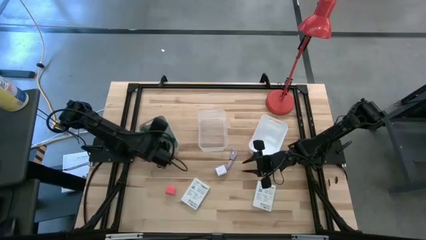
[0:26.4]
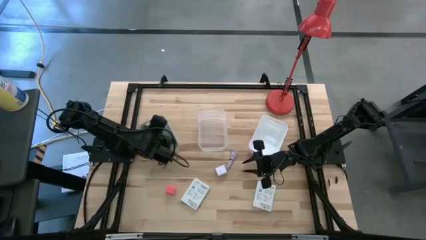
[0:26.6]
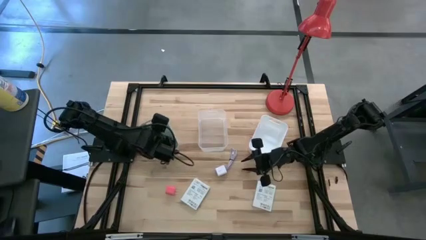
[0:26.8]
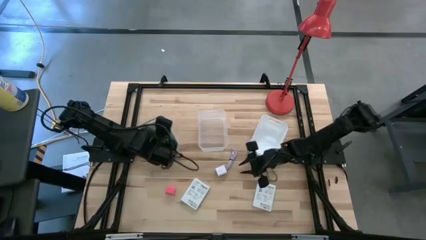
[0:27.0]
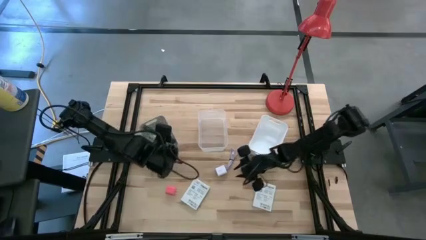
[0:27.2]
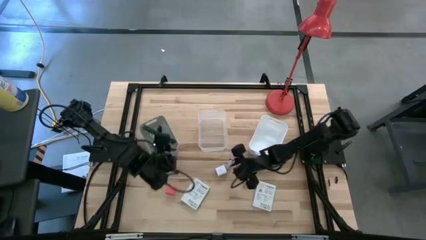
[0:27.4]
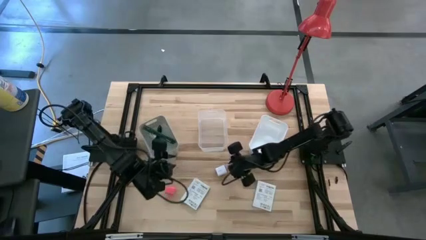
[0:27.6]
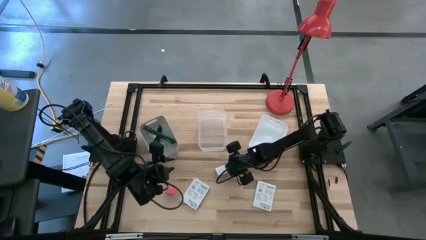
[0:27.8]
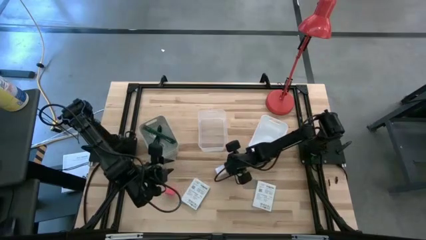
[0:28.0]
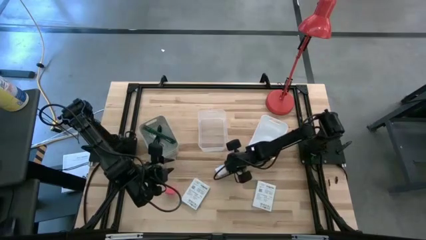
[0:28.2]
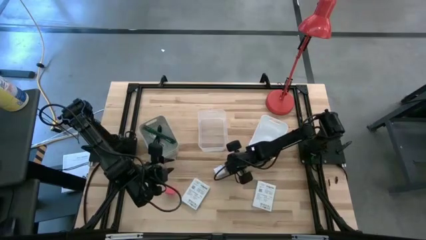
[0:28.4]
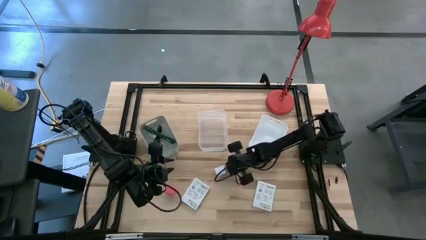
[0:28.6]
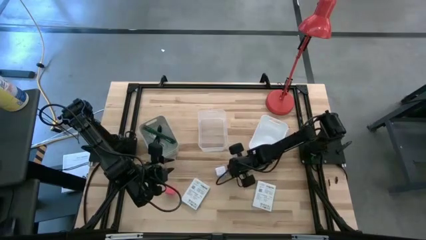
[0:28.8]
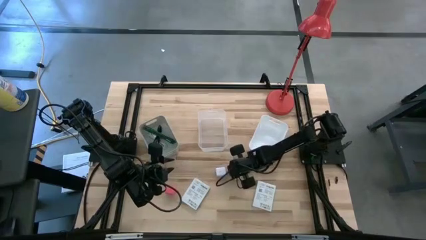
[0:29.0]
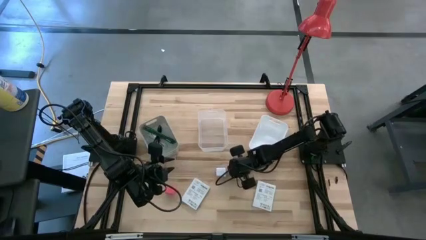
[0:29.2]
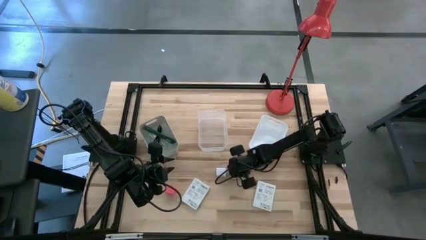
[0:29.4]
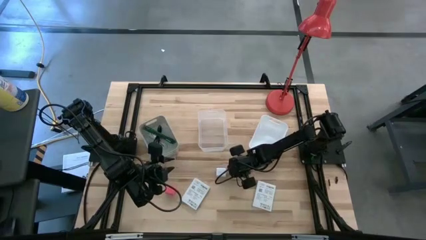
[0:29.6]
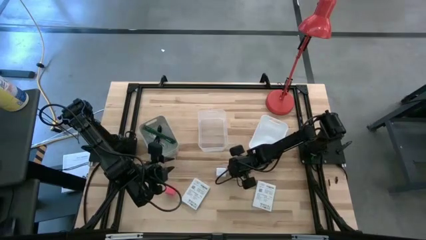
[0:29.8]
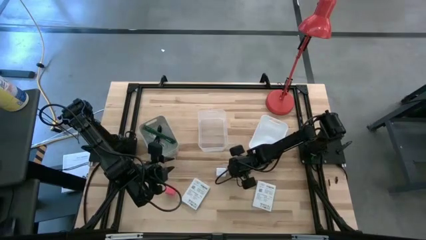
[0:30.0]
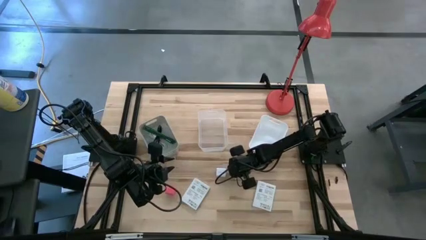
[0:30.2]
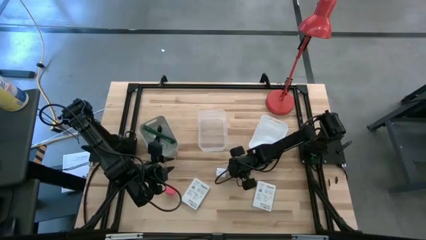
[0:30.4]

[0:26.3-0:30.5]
Task: Pick and place items into bin
Put the gray charger cable into the gray bin

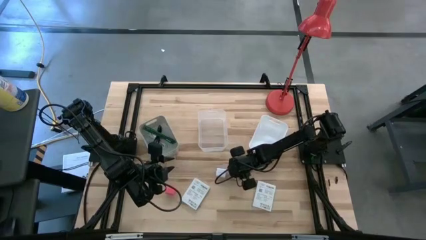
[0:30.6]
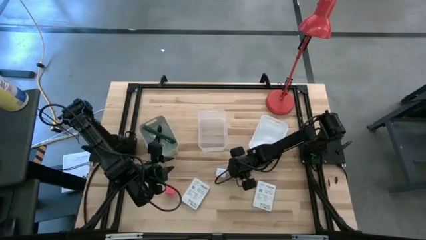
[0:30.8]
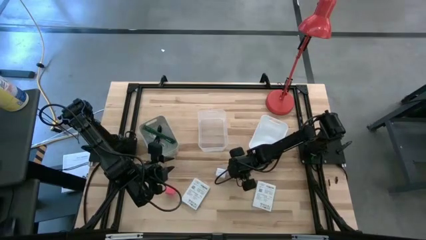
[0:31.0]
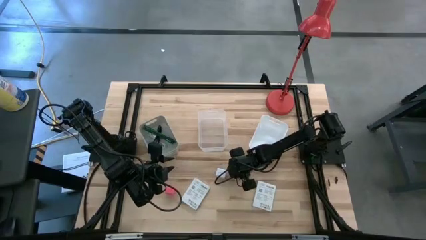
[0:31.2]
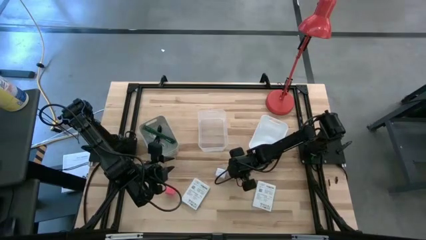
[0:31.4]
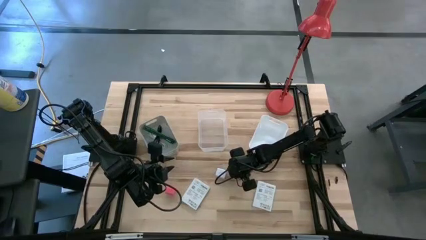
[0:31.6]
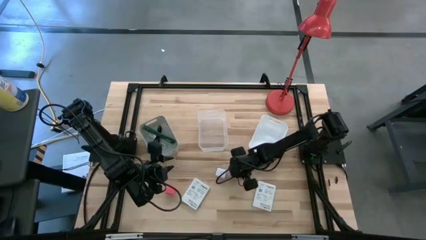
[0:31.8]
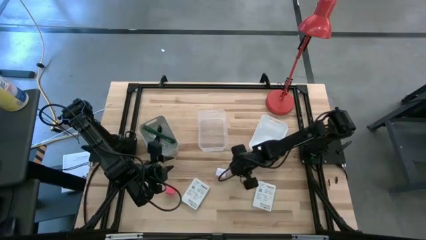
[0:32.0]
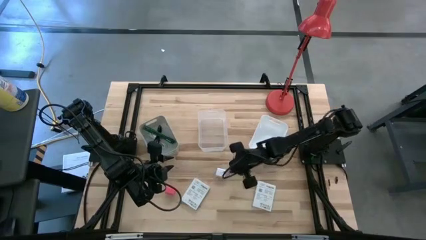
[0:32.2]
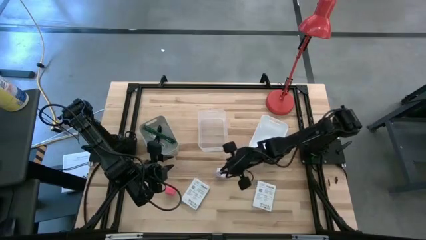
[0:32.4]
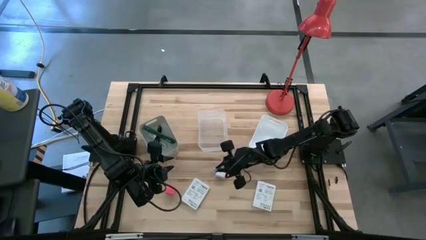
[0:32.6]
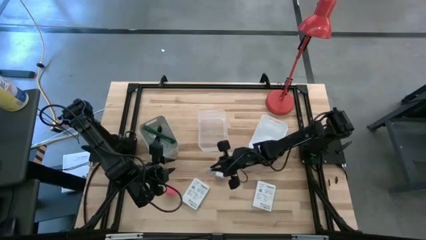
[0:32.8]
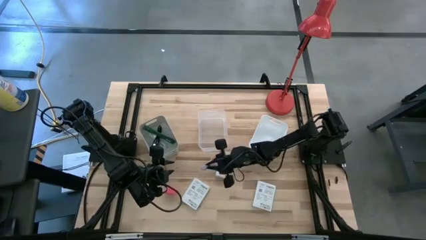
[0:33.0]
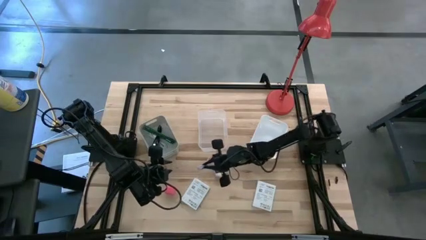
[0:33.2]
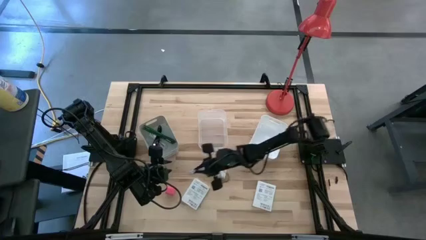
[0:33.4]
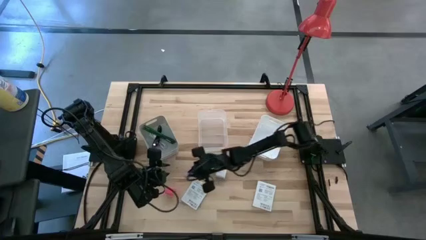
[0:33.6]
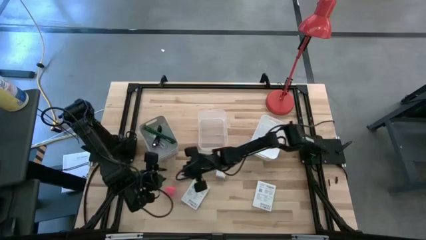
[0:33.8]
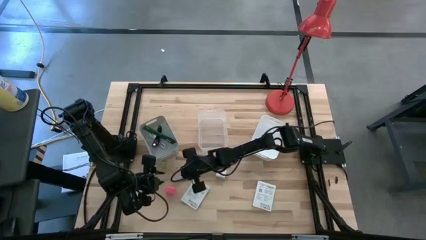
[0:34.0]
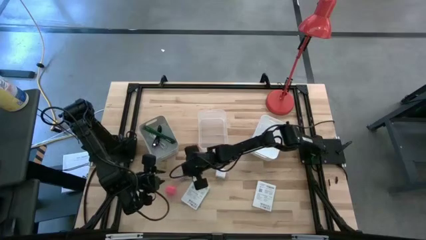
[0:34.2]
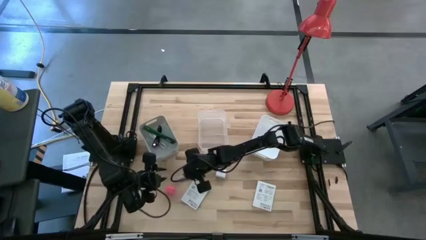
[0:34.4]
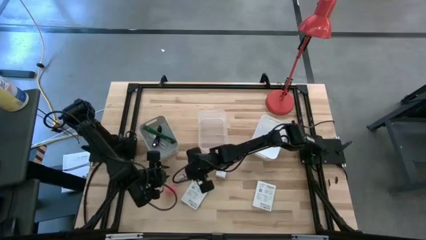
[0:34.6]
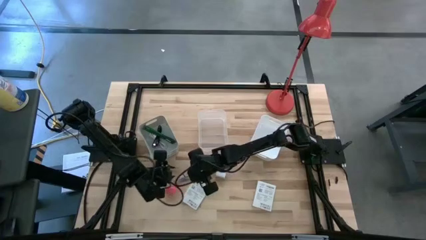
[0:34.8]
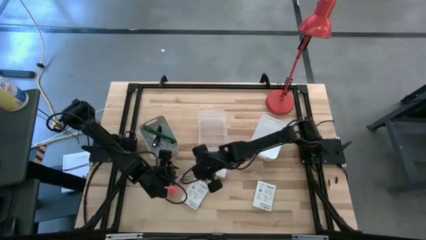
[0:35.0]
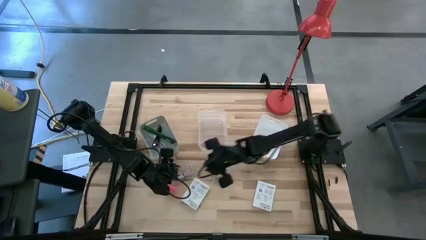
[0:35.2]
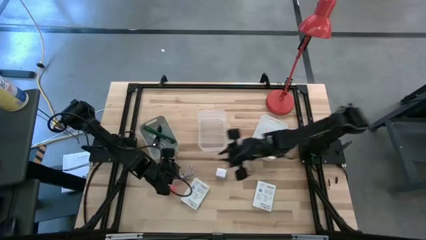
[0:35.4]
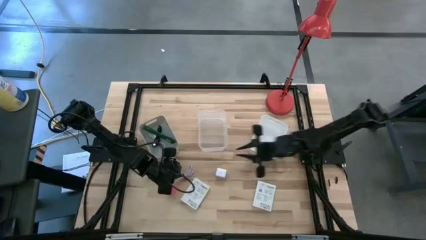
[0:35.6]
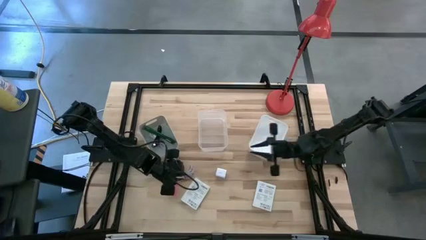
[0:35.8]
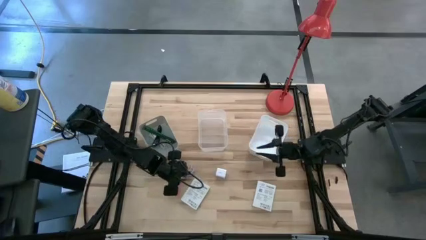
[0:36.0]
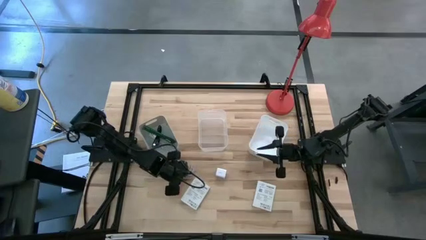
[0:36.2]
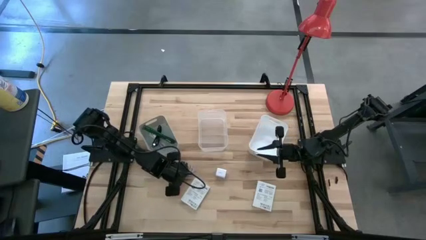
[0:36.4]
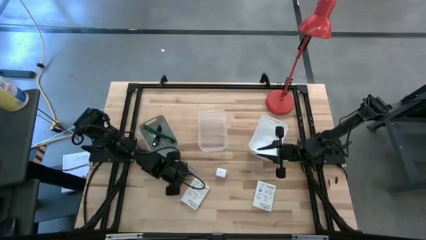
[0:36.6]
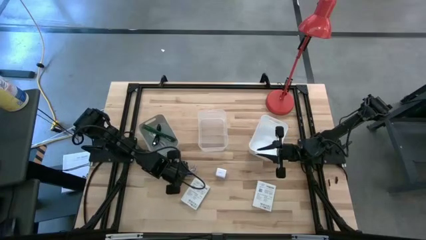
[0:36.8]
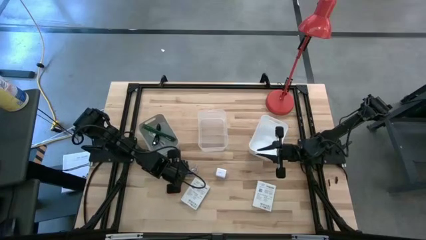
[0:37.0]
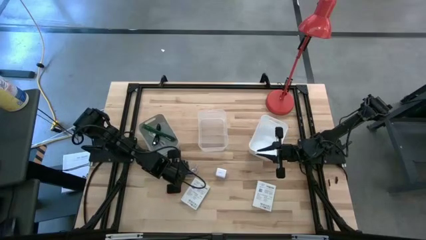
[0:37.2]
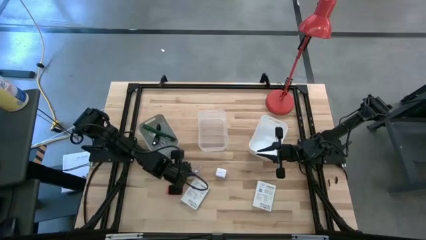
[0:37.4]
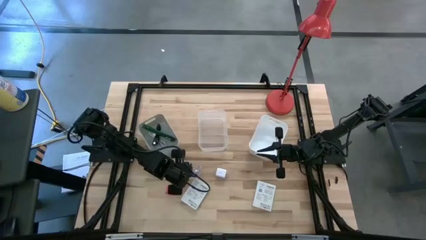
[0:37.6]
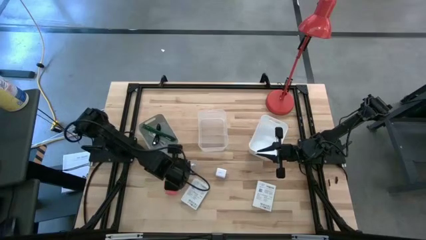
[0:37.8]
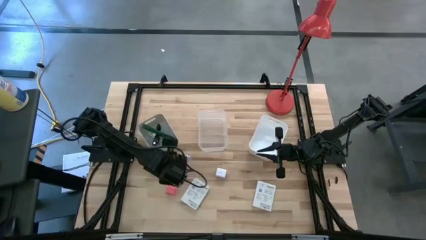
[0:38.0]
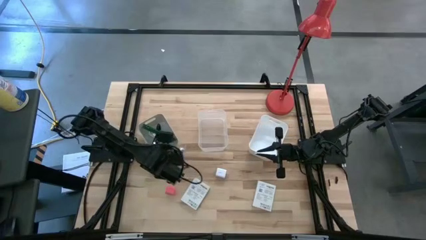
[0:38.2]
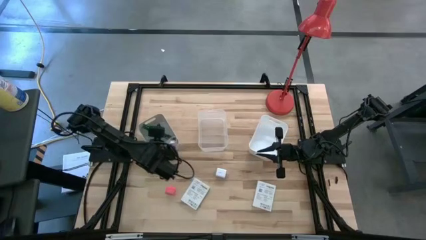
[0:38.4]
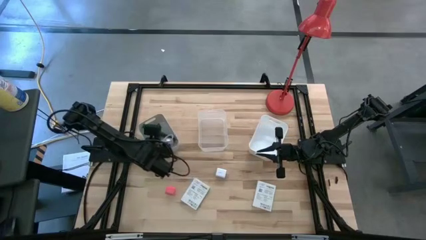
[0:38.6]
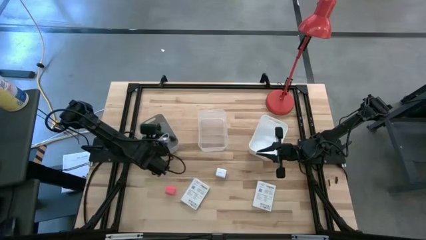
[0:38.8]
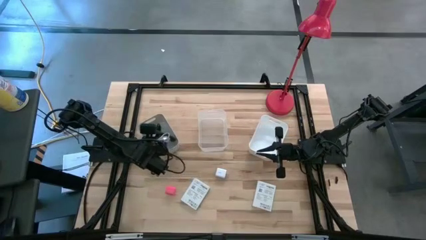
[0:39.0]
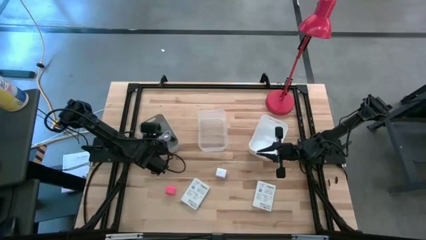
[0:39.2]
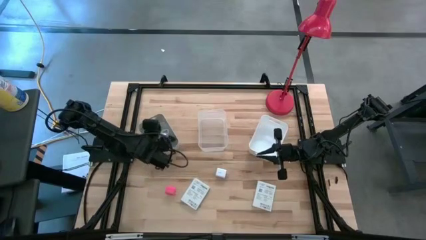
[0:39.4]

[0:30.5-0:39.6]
Put the gray charger cable into the gray bin

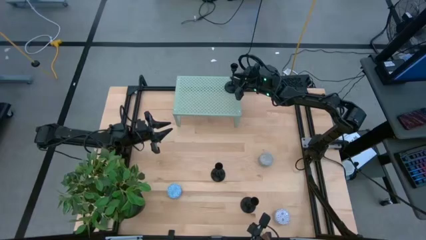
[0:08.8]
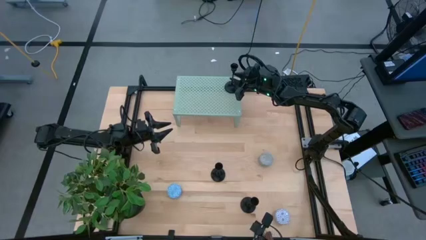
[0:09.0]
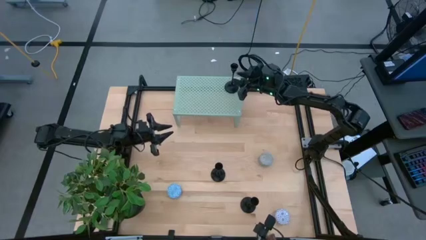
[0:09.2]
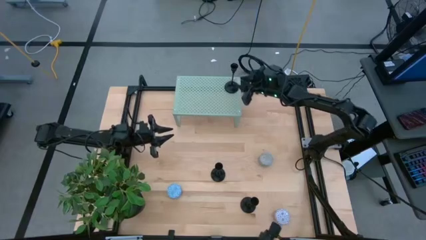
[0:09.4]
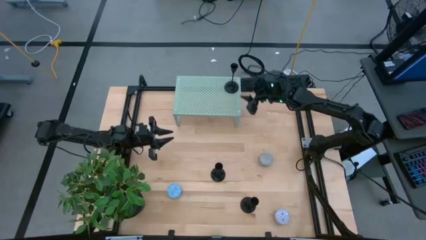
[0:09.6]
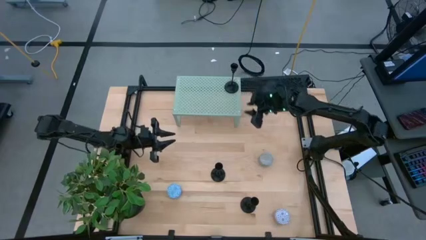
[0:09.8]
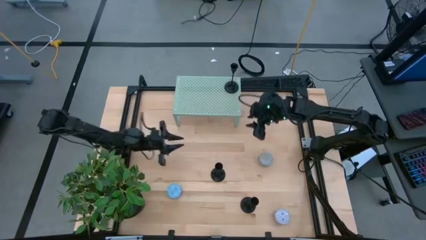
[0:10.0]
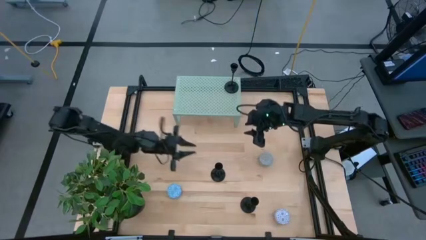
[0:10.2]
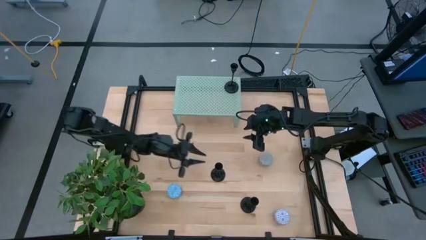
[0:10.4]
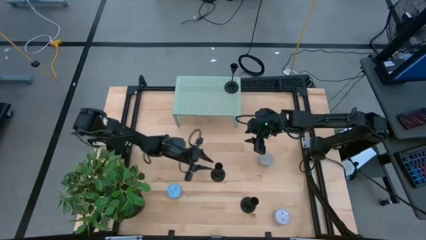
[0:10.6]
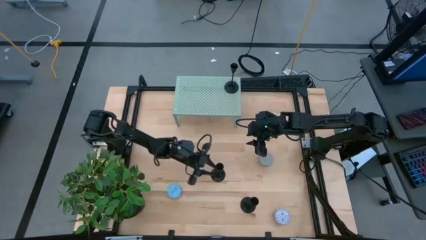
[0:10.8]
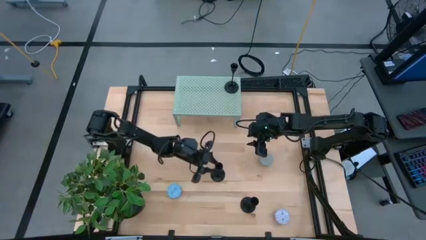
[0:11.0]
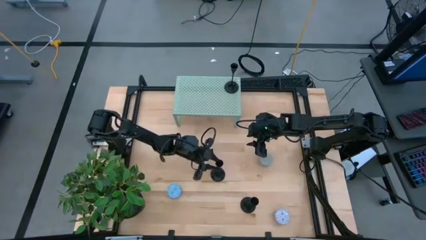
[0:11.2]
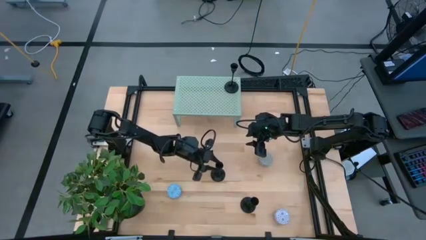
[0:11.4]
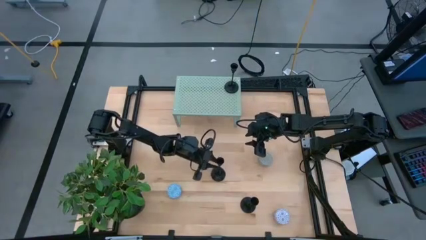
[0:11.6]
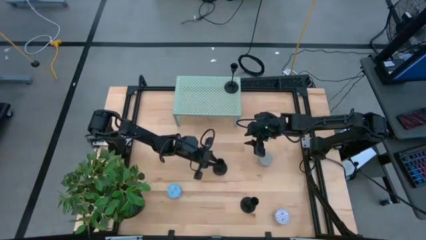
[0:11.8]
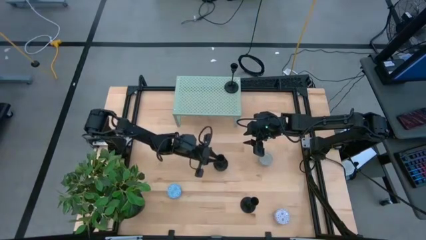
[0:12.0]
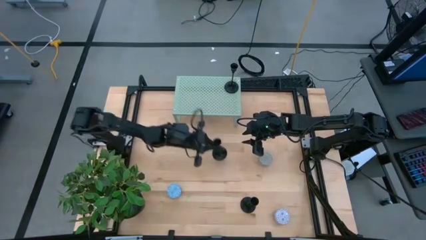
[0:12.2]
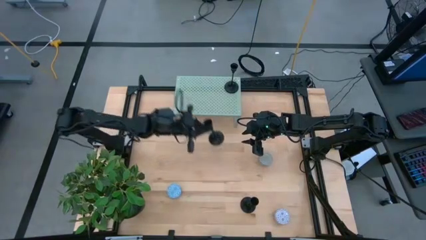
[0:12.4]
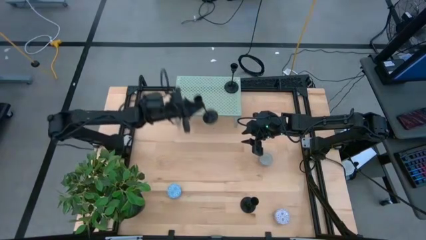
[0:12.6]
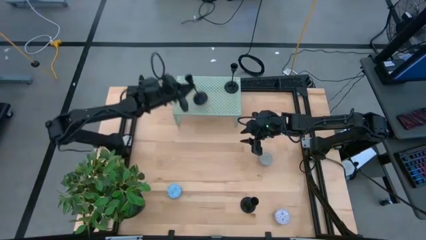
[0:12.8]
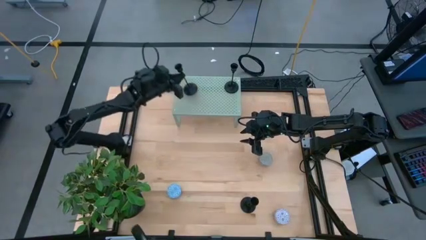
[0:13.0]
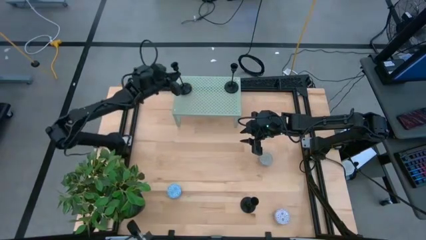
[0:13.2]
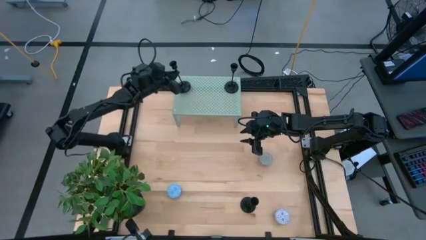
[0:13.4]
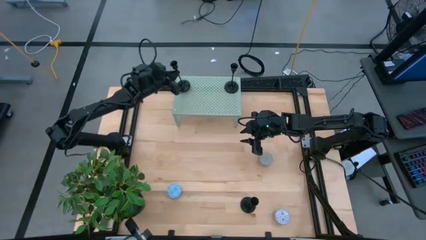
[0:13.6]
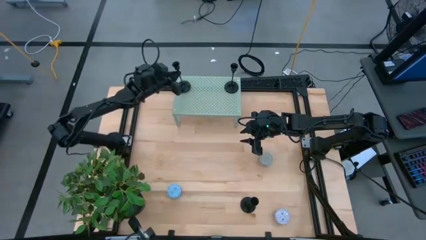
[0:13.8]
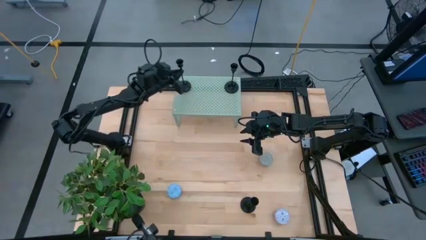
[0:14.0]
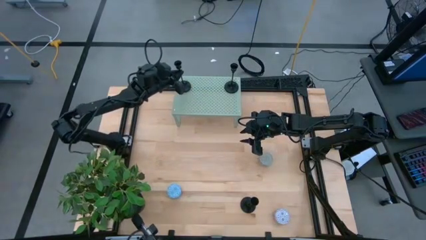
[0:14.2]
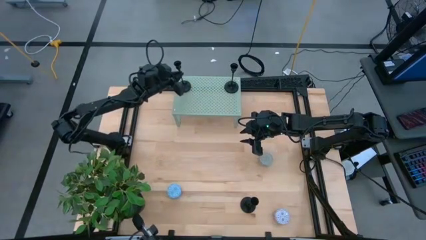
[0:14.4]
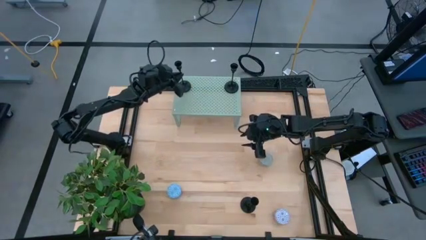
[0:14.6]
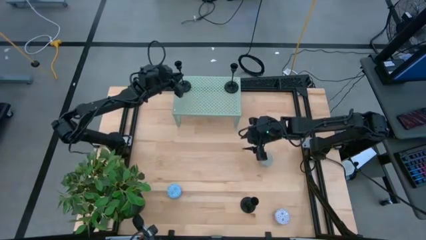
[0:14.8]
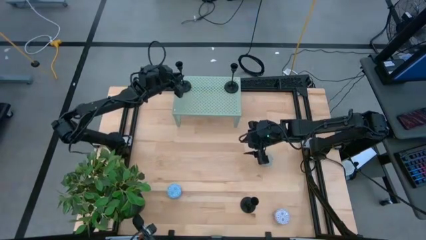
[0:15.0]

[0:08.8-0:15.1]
Task: Pick & Place candle stick holders
Put the top black candle holder on the shelf
